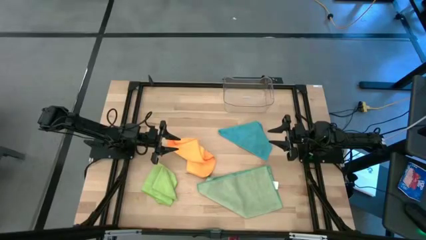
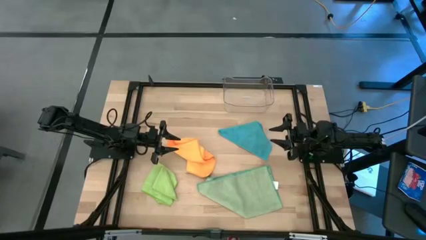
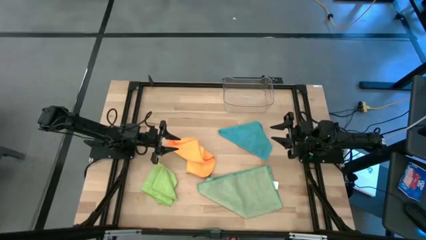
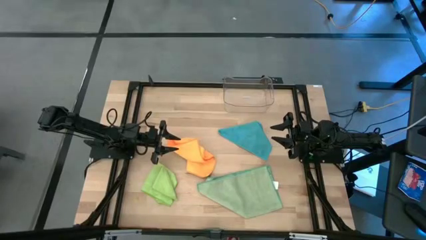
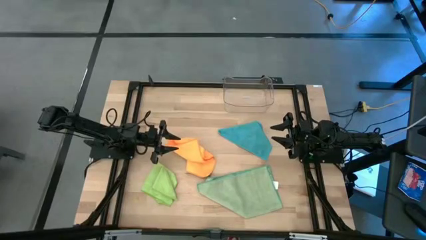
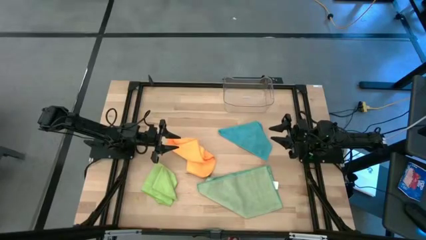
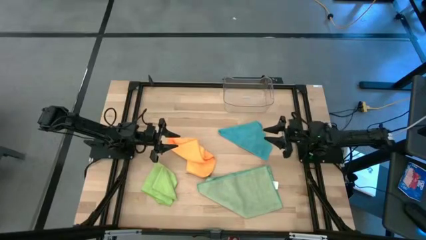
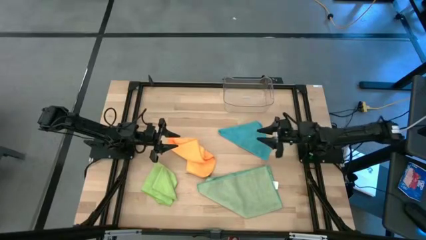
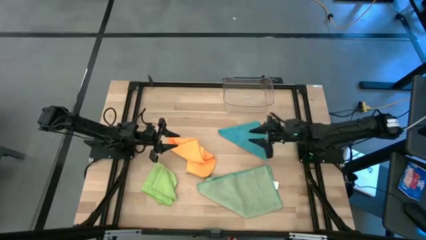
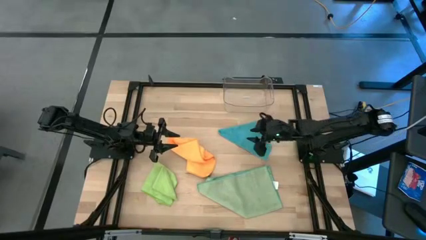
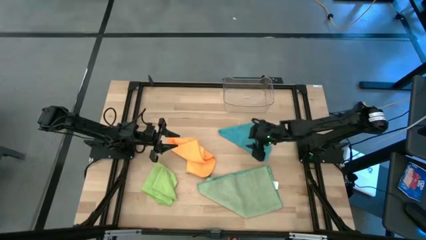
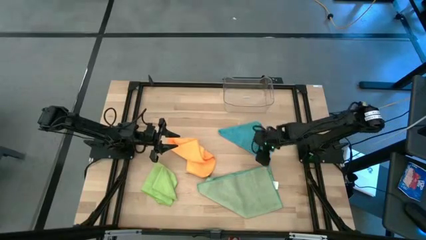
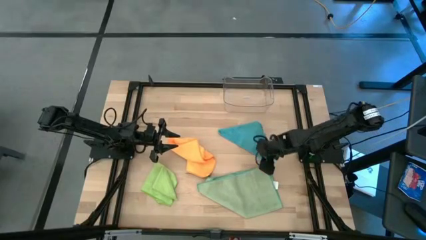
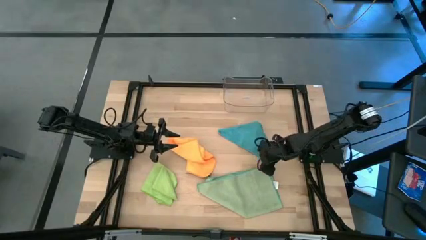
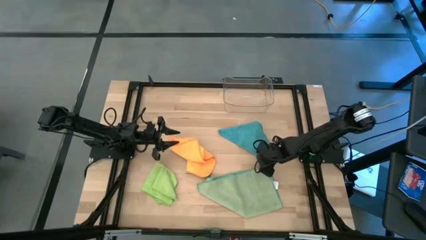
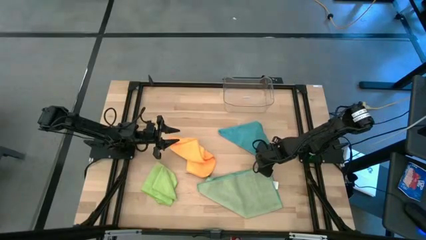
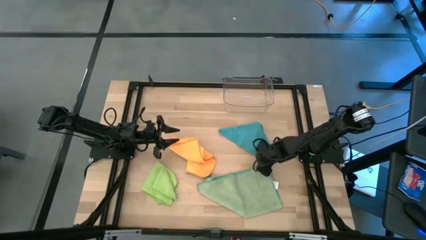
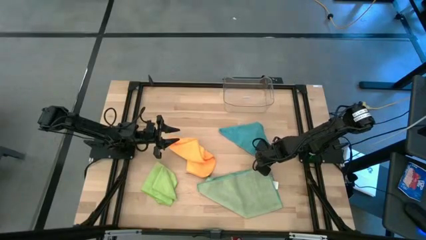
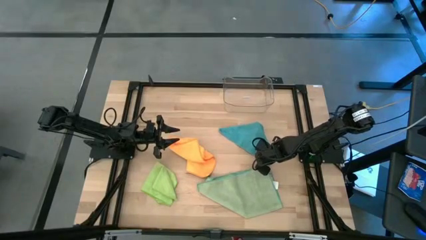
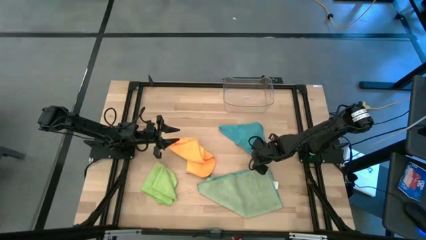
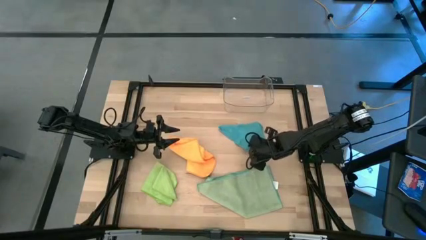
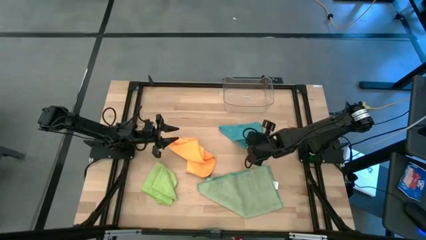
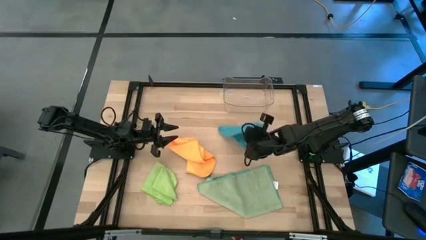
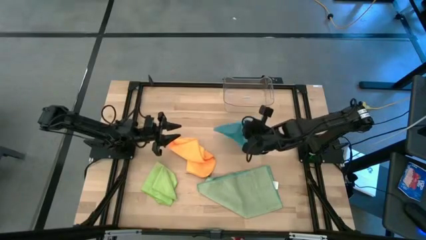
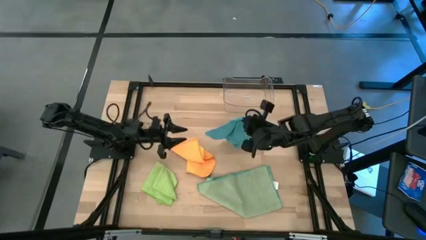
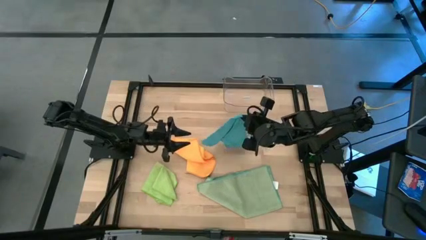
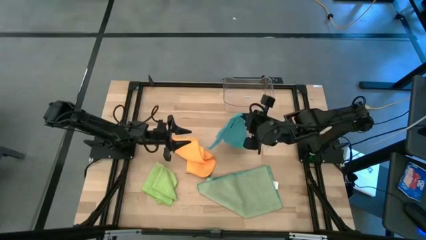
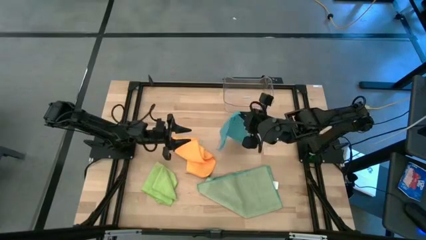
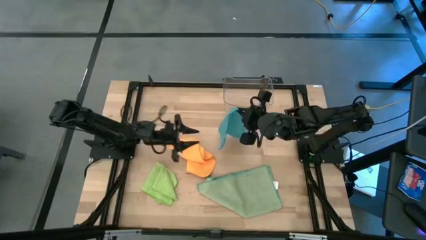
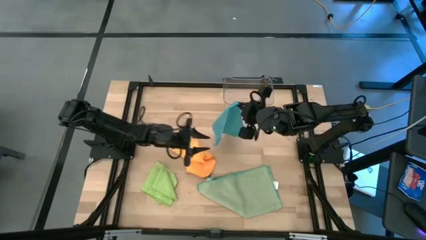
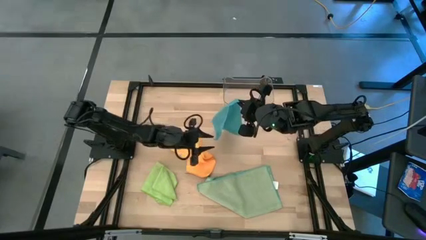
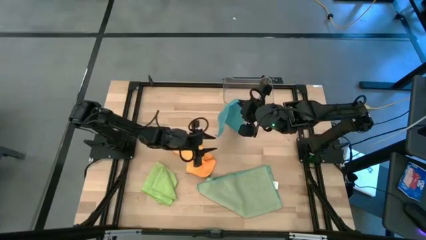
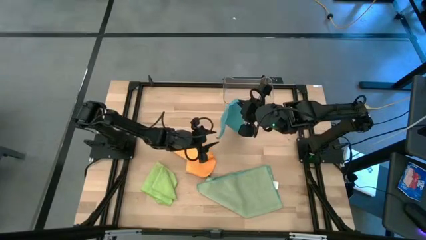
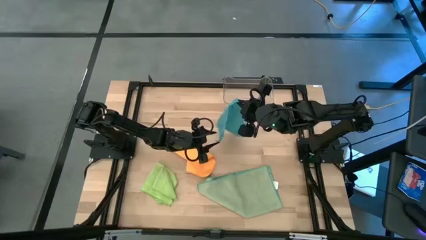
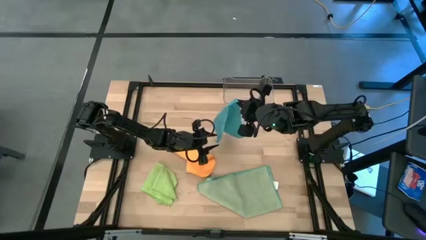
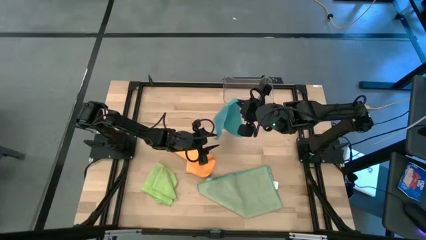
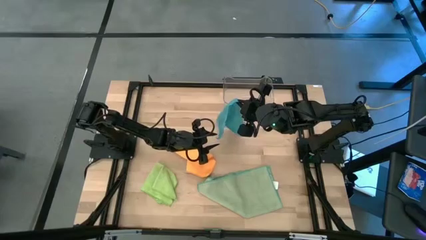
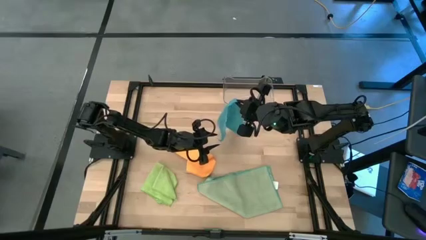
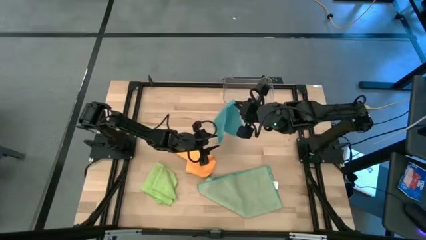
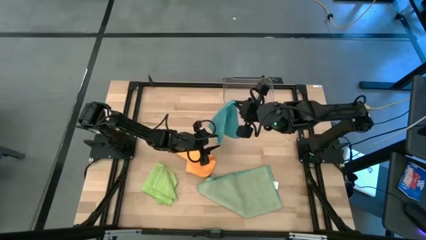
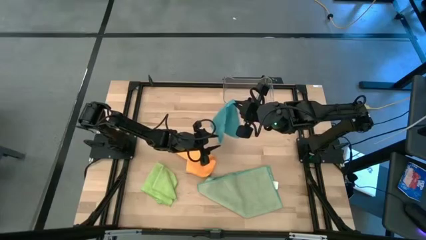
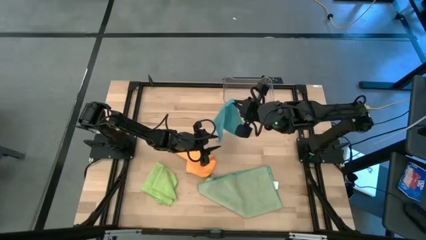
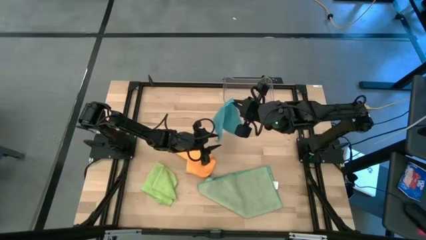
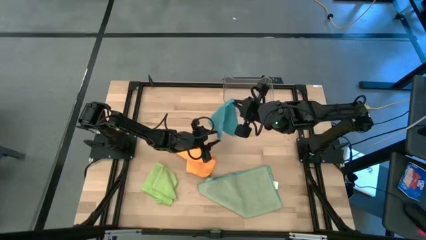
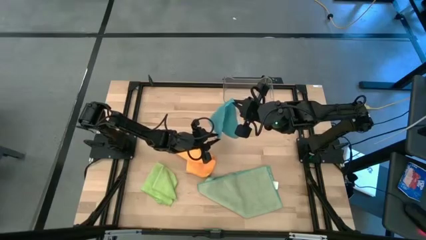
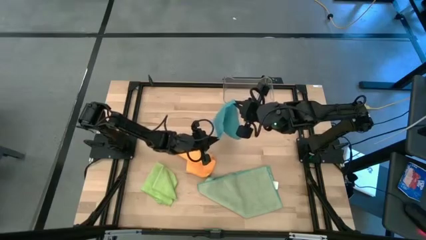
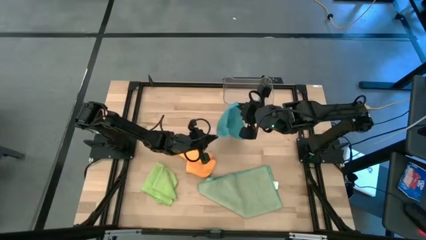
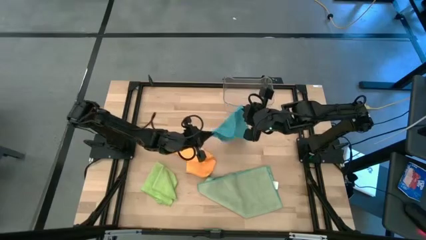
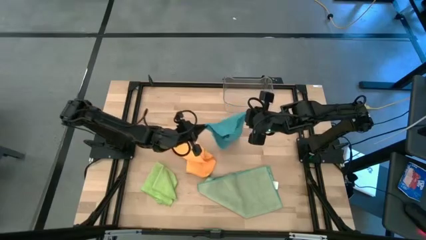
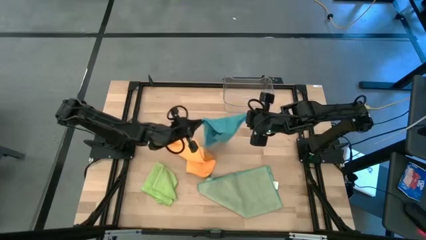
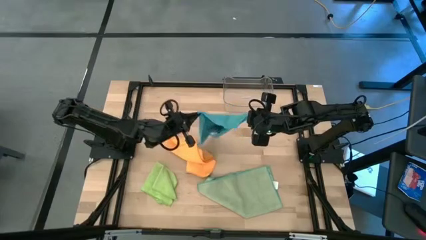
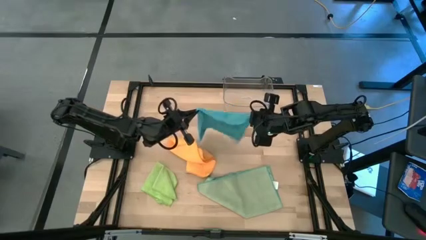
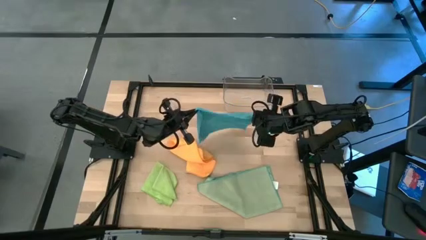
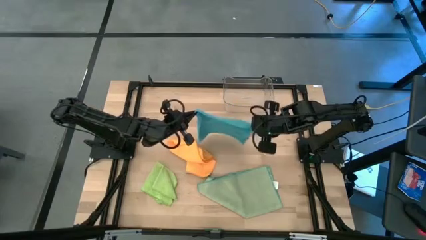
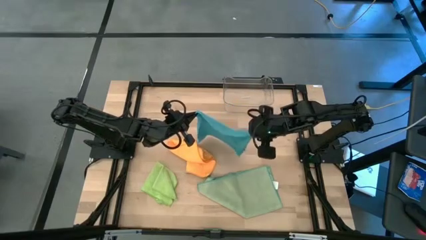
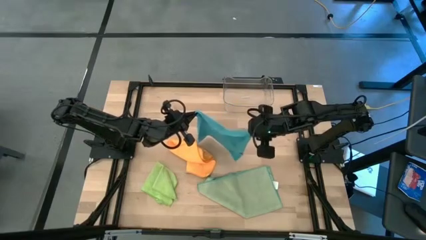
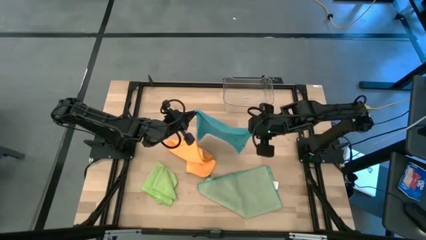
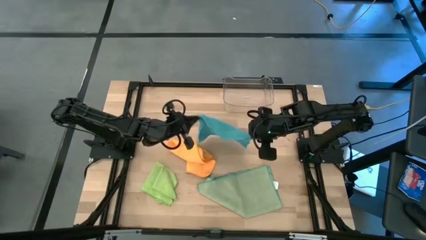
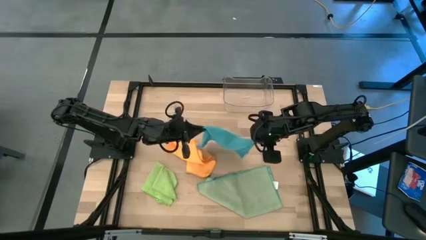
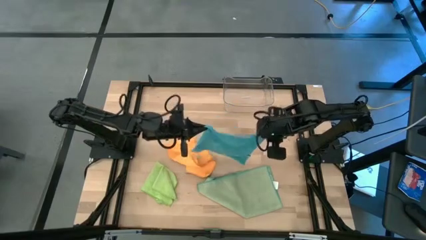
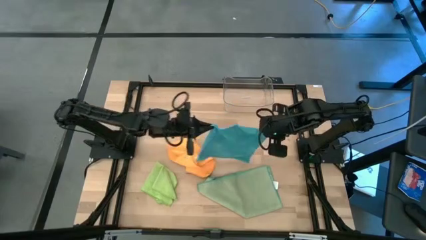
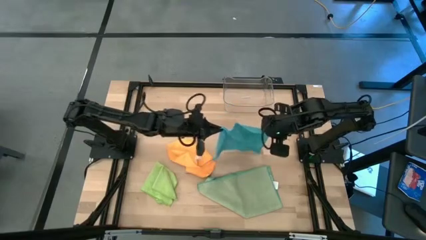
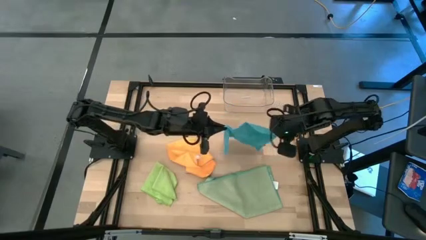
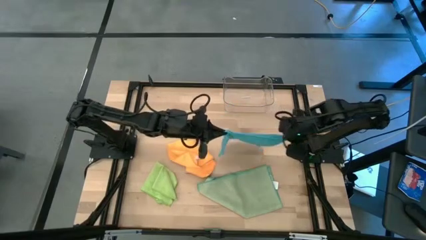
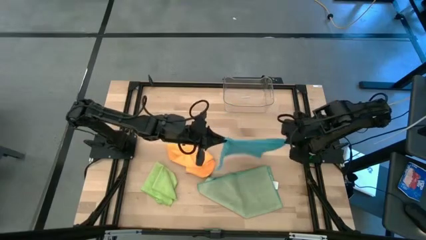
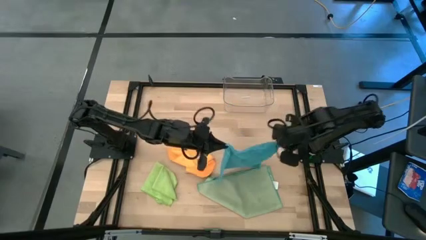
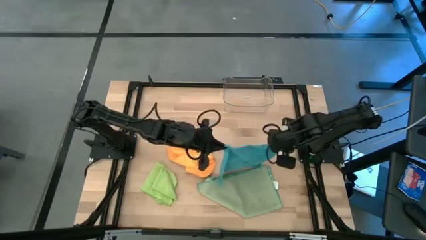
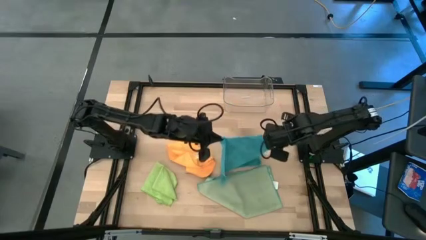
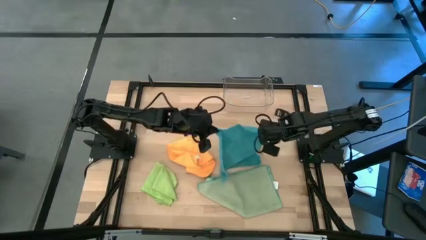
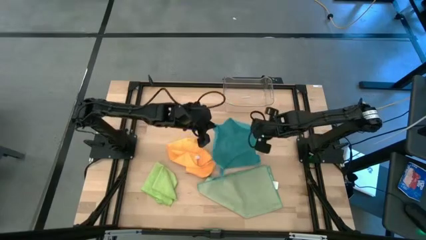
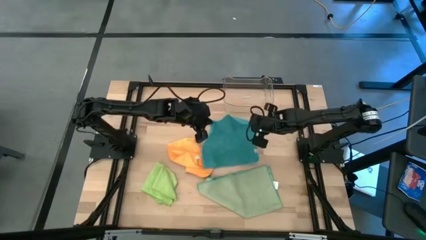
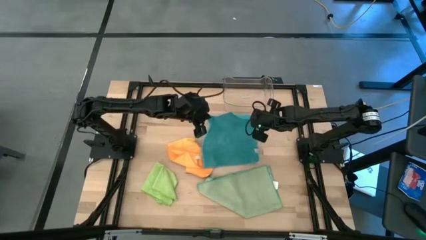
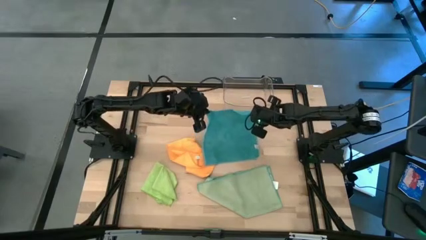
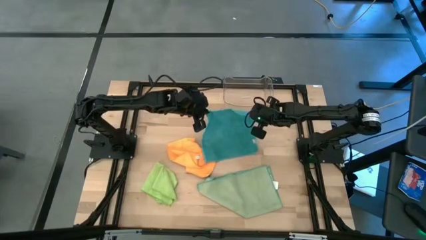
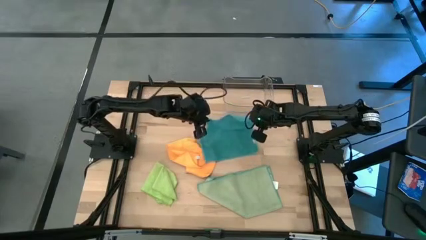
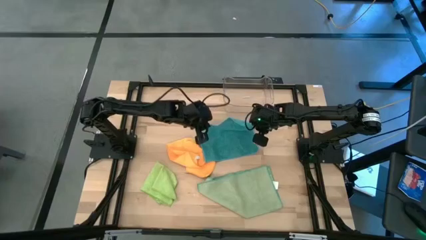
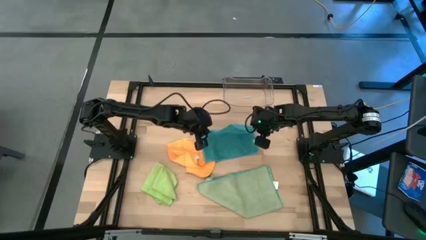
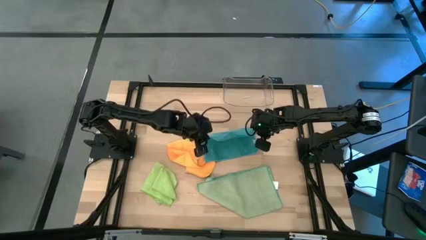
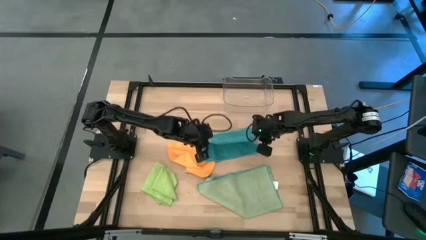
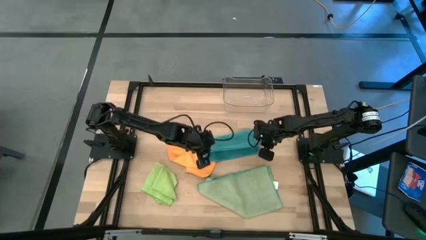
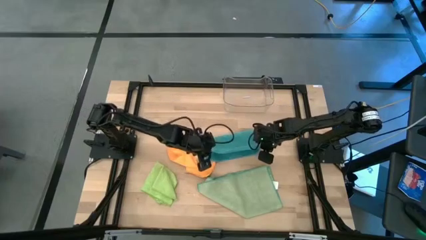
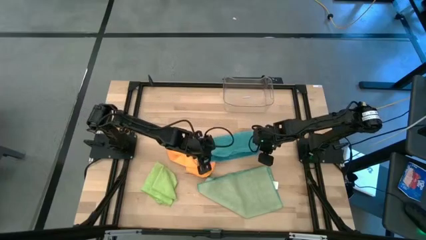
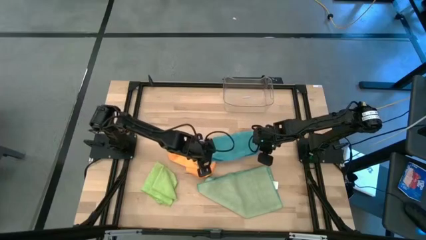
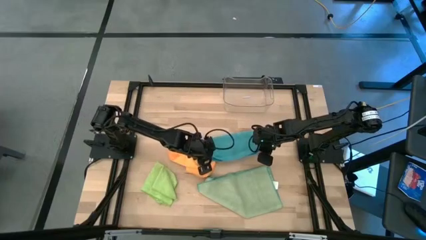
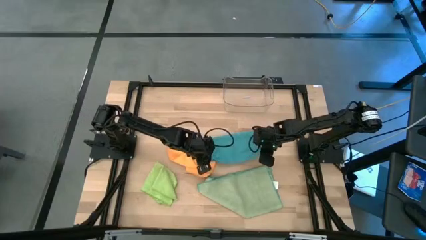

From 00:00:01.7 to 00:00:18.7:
Task: Fold microfiber towels
Fold the blue microfiber cloth
